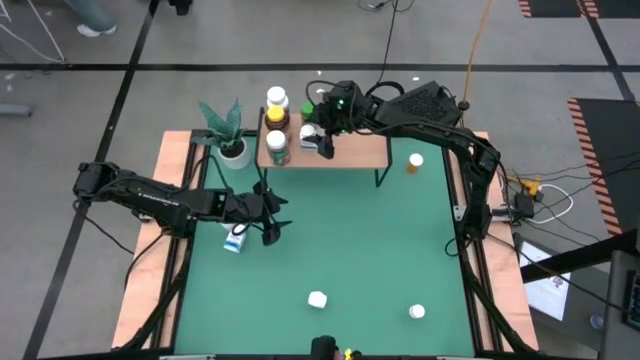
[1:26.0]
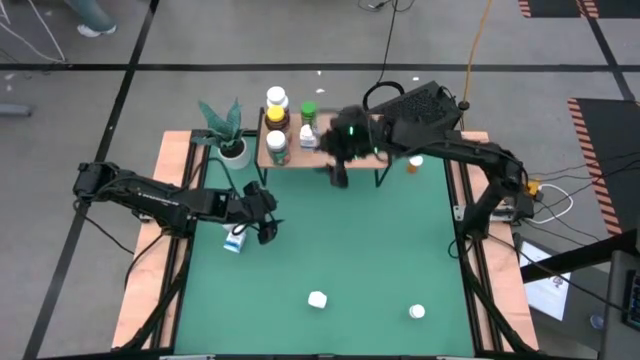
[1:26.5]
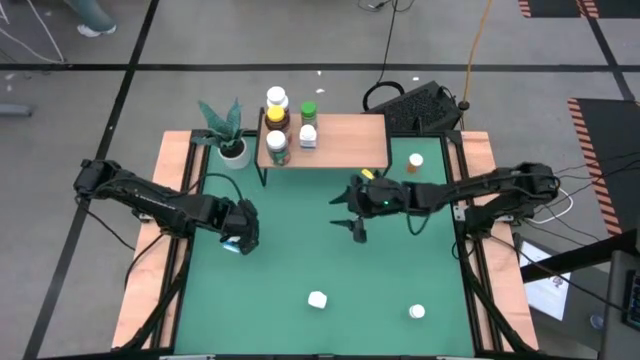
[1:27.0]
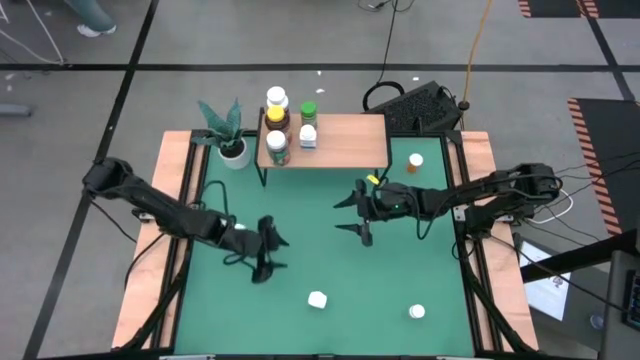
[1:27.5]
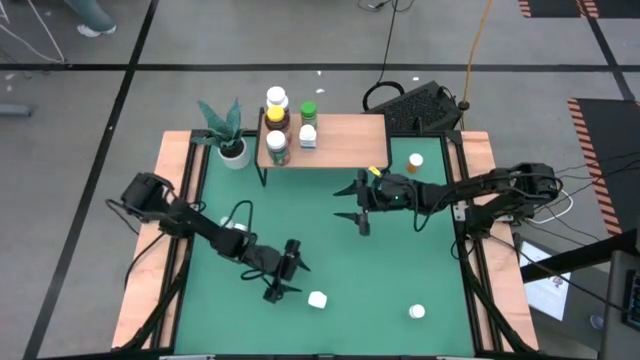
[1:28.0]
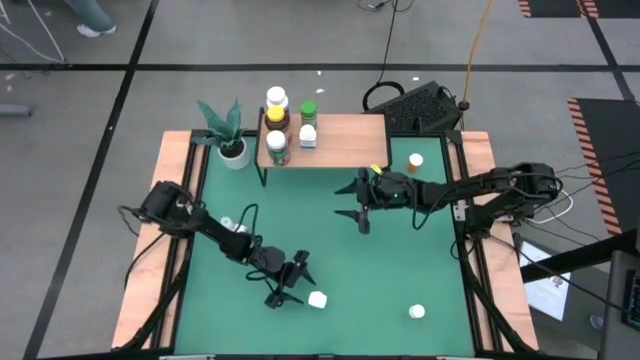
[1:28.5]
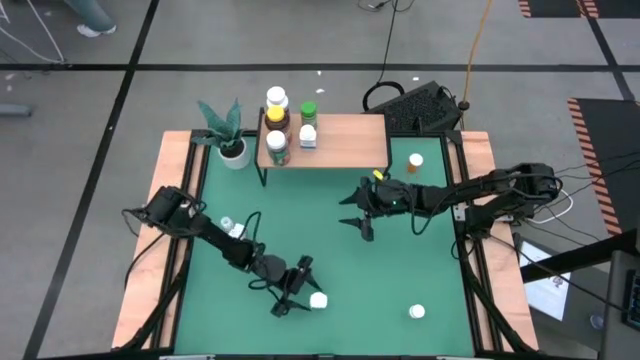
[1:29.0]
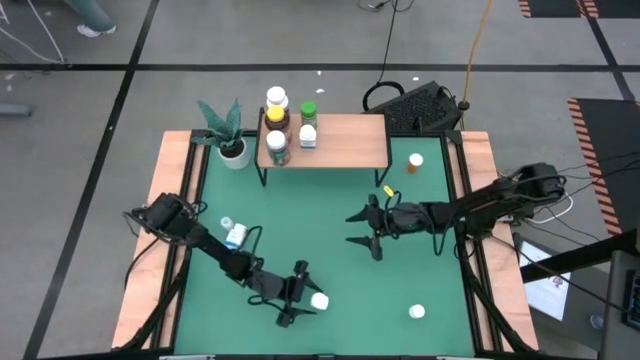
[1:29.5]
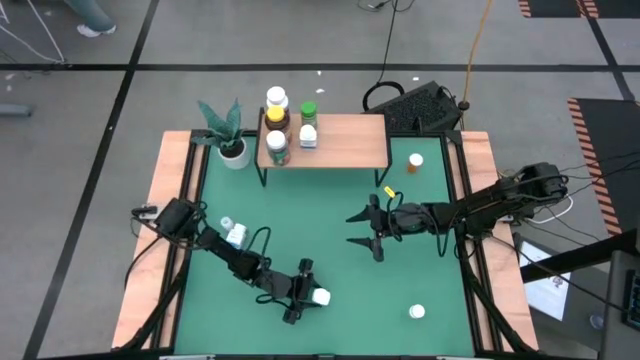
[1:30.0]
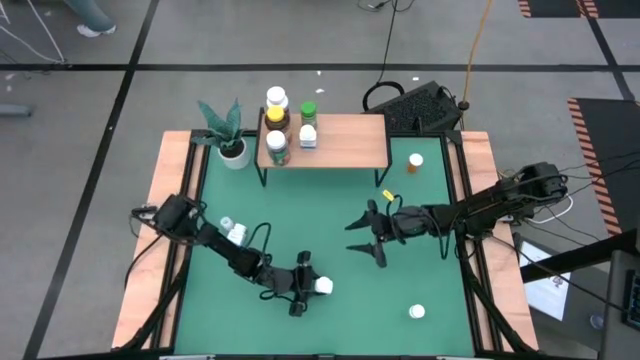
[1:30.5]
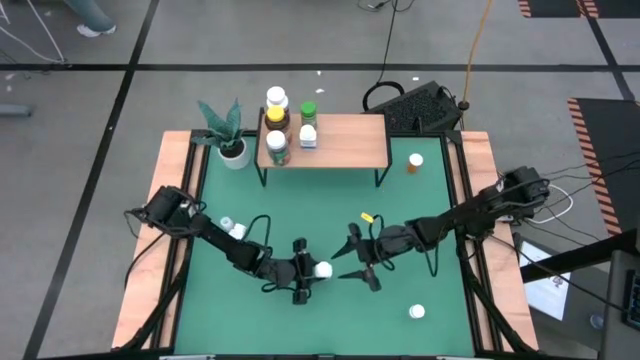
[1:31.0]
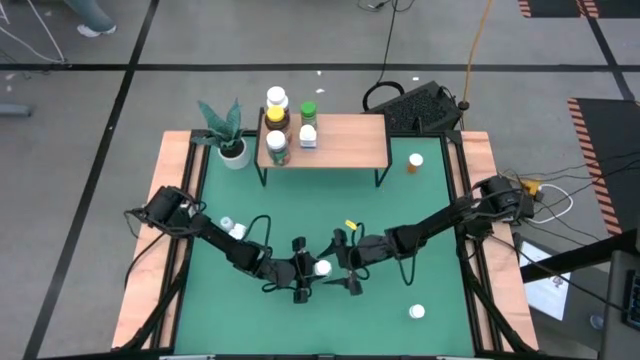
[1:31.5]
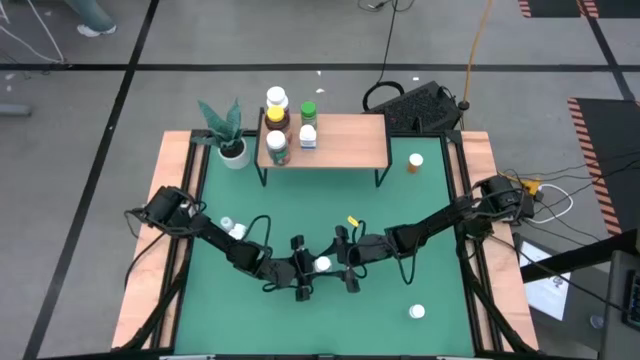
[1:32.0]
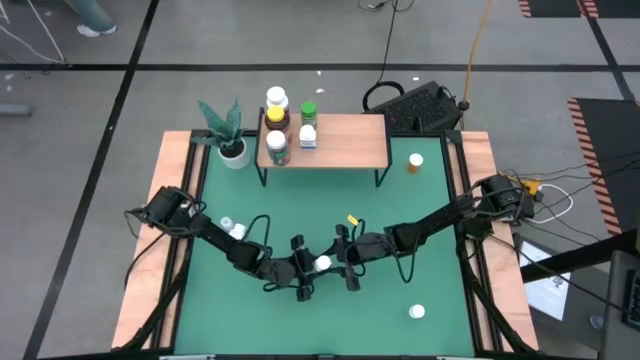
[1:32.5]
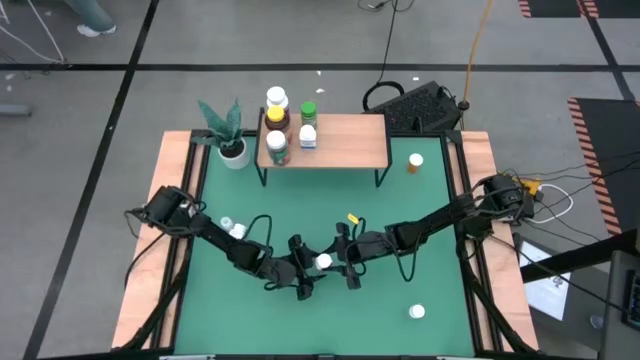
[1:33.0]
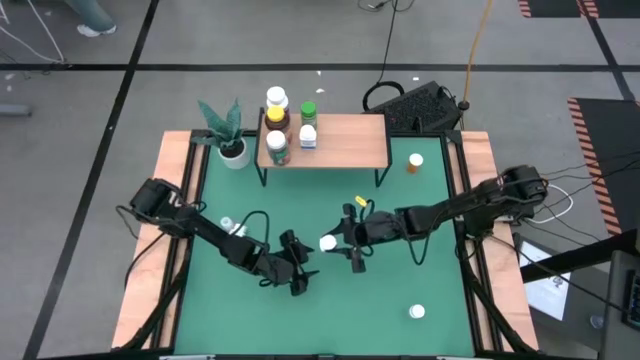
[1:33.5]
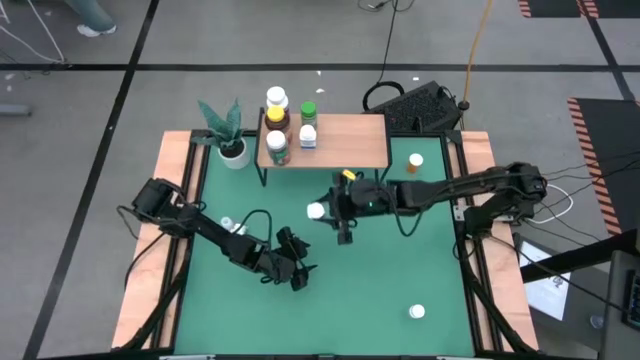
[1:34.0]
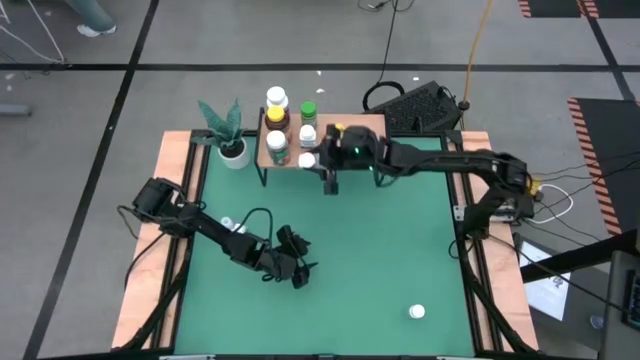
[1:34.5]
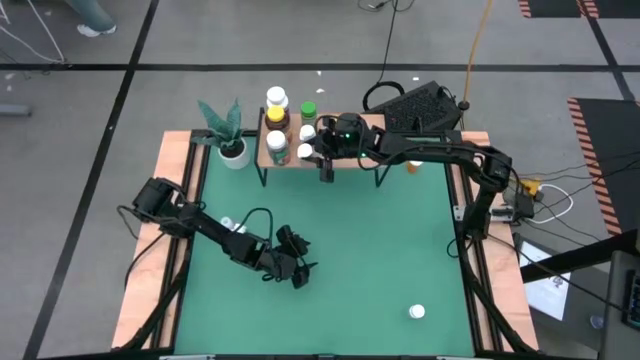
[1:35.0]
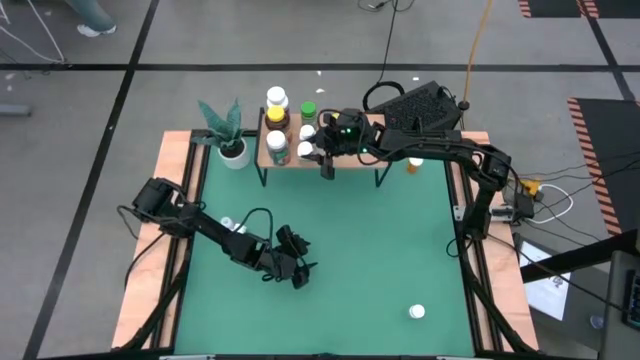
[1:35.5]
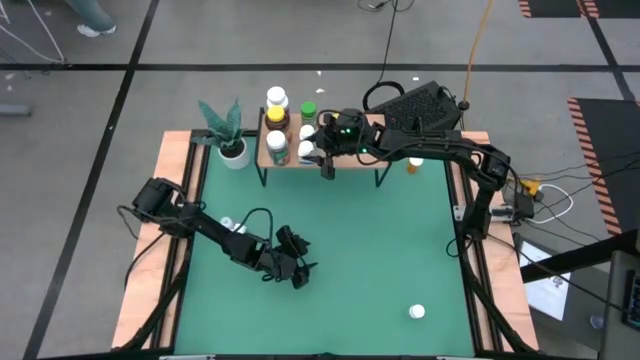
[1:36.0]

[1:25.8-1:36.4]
Task: Pick and place medicine bottles onto shelf by color
Put the bottom white blue pill bottle on the shelf aligned with the white blue pill bottle

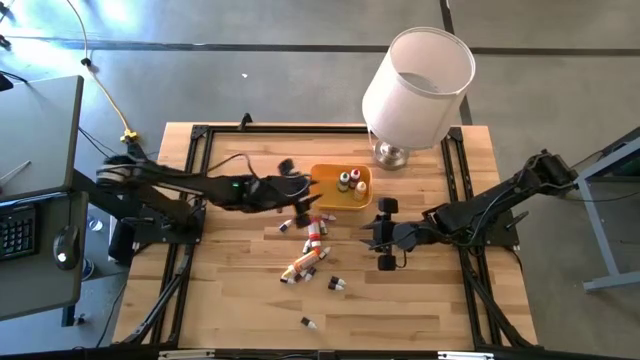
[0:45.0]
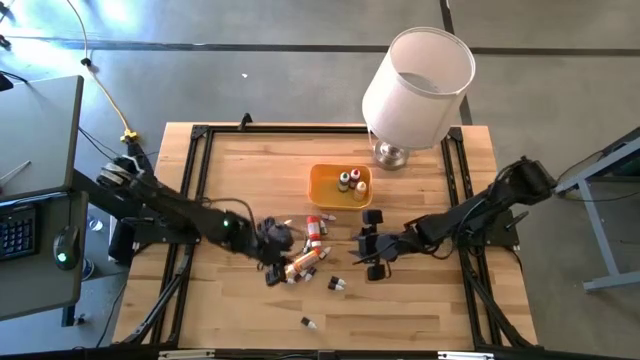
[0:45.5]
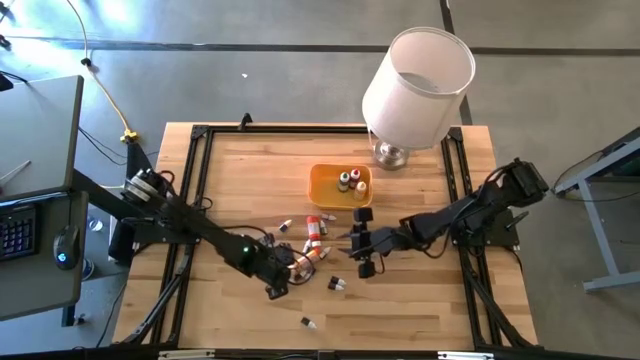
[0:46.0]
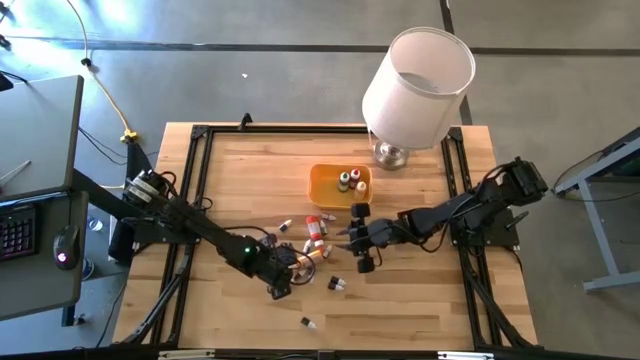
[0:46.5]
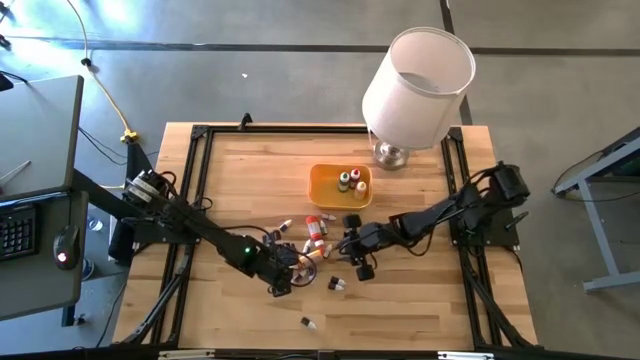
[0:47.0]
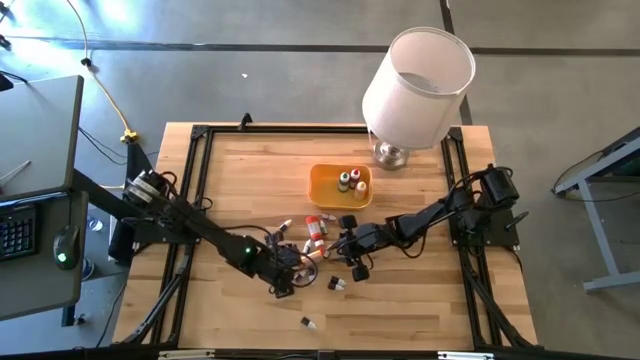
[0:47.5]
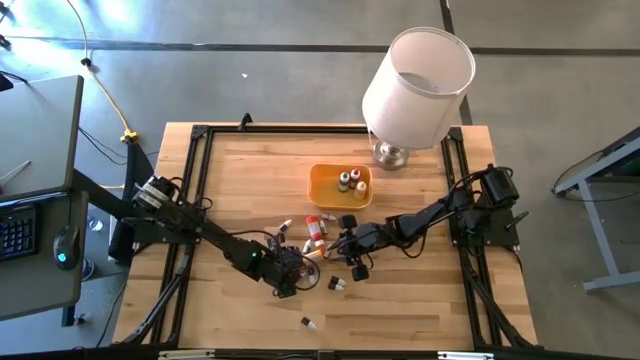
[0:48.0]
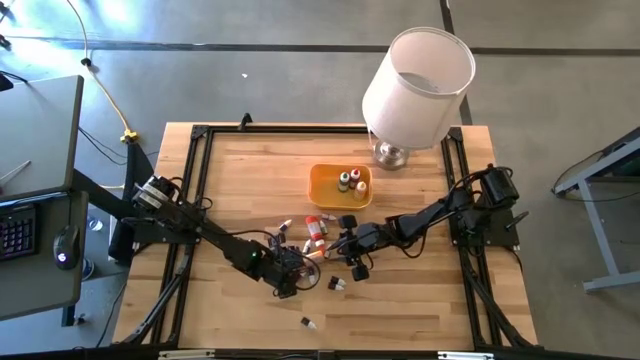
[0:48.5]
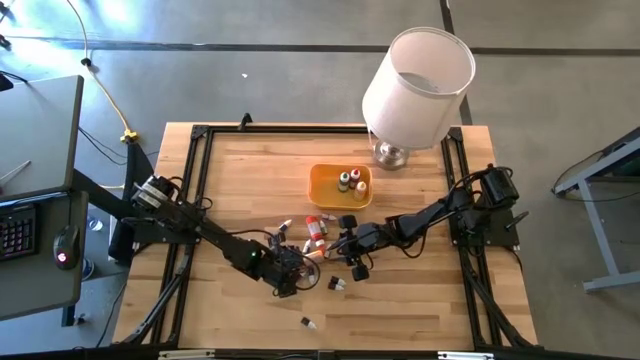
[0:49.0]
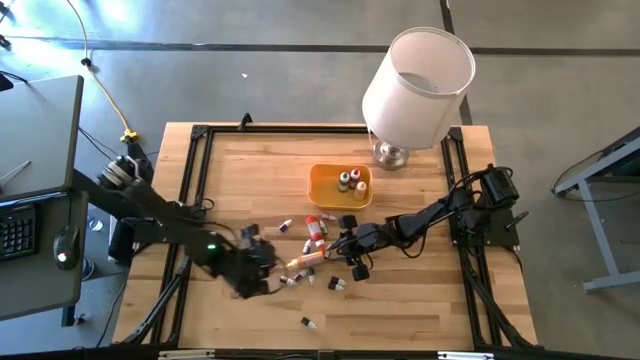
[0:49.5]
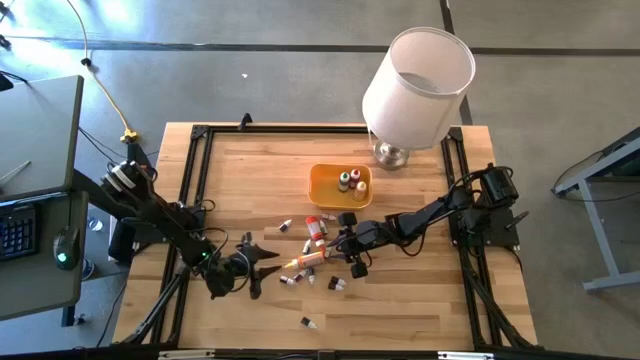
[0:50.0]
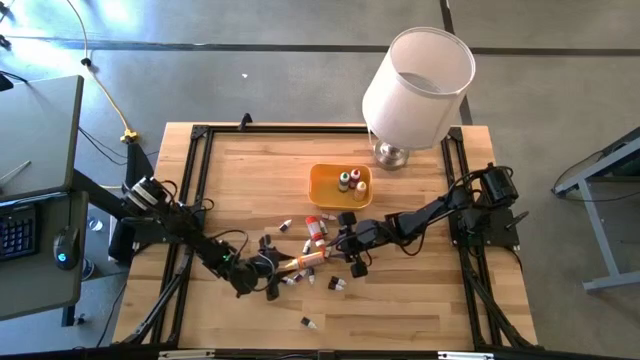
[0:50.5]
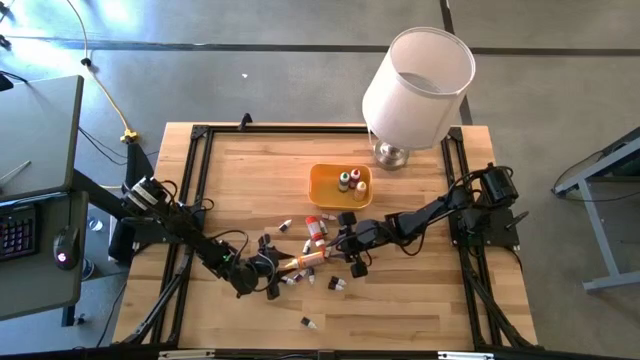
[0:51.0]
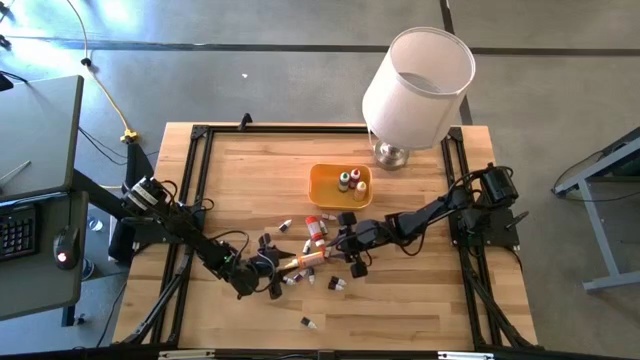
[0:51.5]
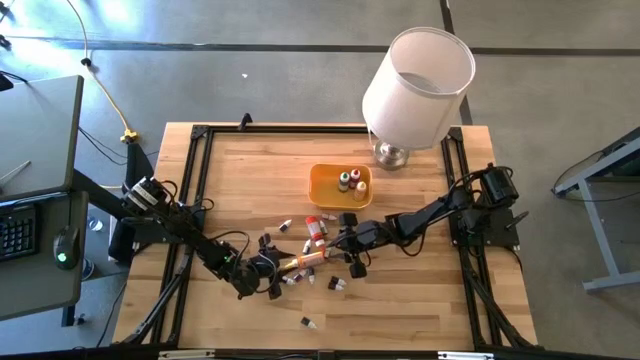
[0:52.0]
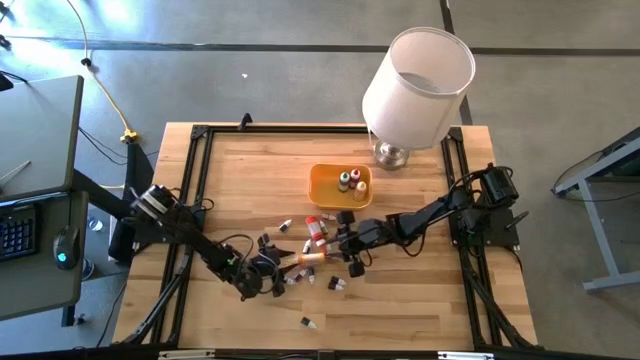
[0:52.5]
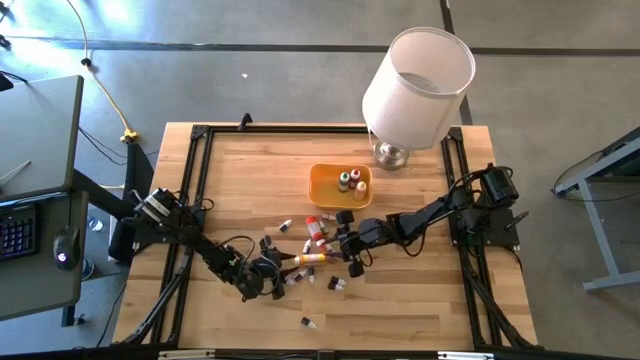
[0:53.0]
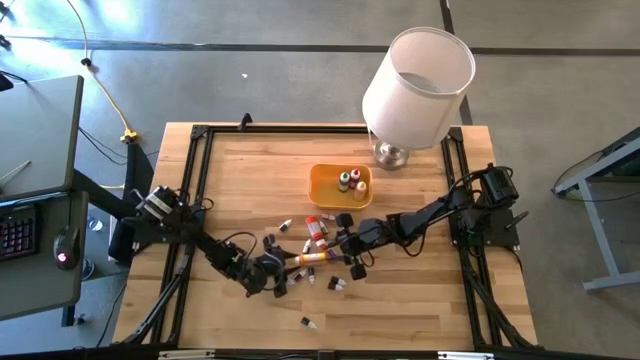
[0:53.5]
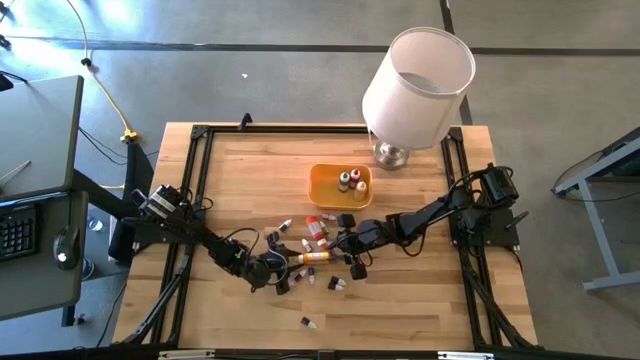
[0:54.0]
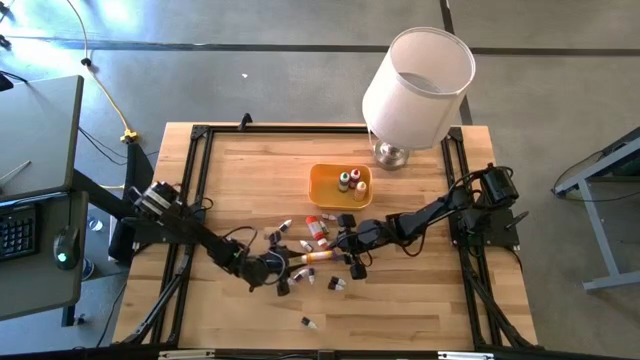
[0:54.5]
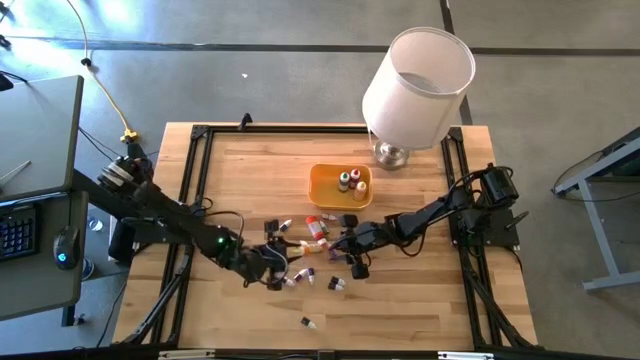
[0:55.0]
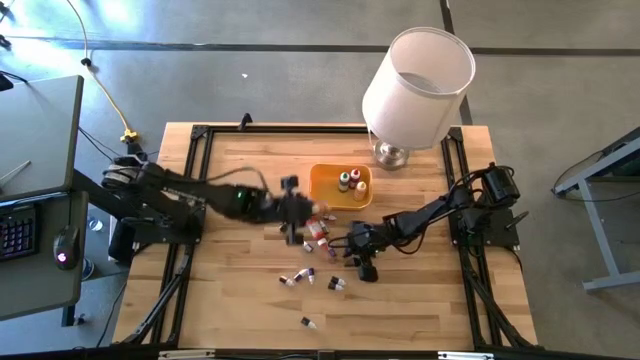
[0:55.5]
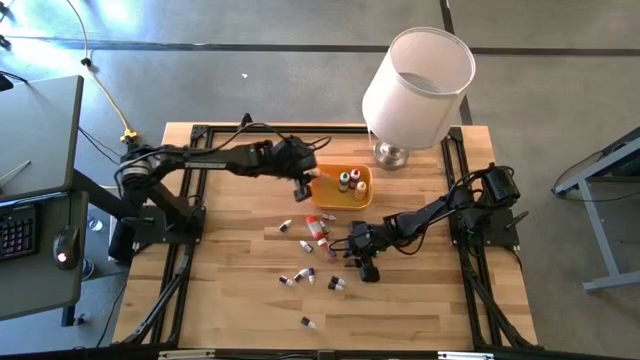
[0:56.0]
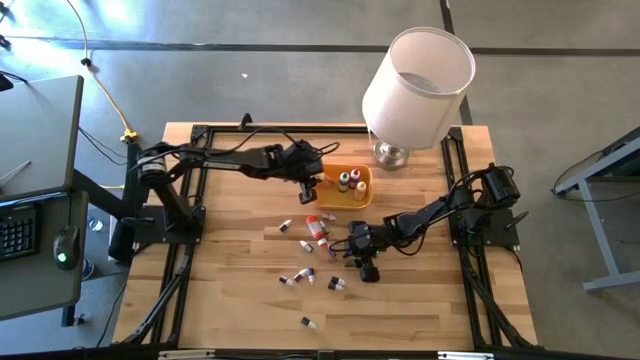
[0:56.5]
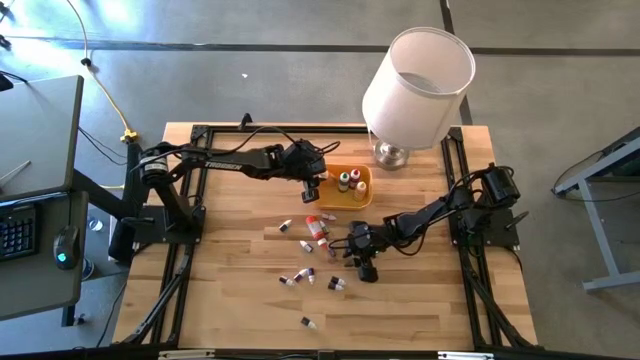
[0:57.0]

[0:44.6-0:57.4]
Task: Pick & Place food coloring
Put the large yellow food coloring bottle into the yellow container
